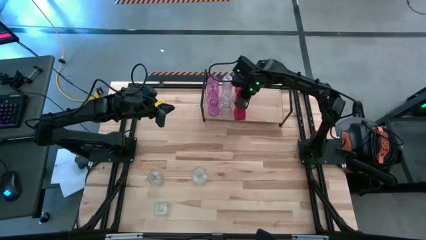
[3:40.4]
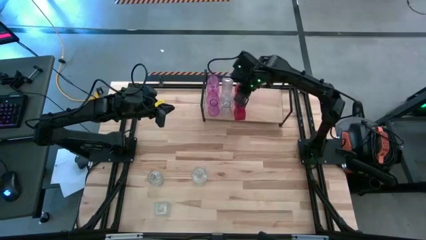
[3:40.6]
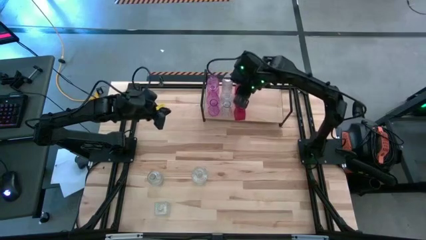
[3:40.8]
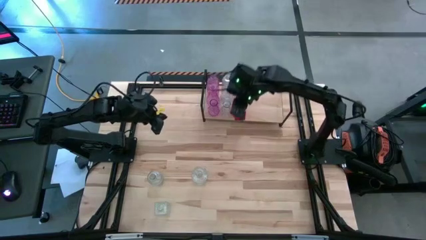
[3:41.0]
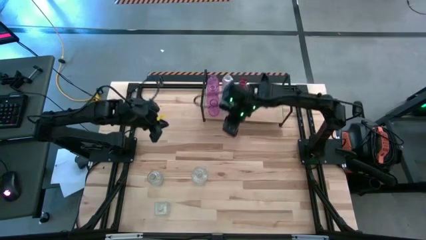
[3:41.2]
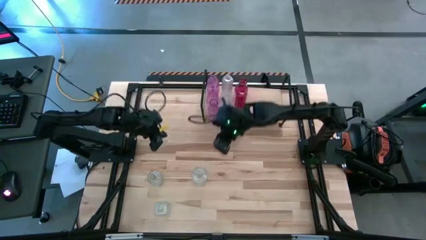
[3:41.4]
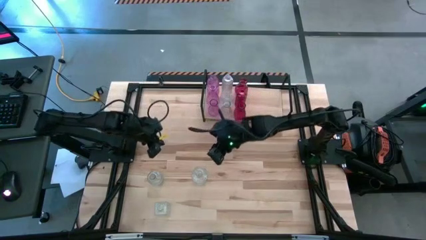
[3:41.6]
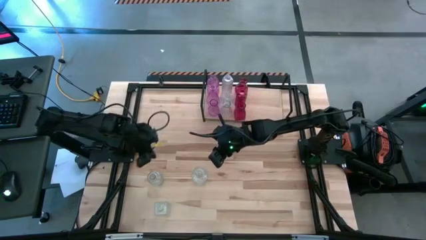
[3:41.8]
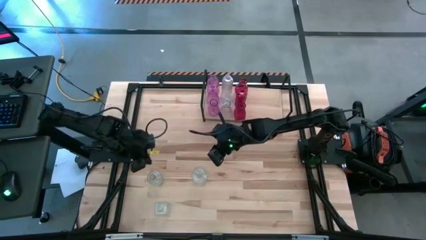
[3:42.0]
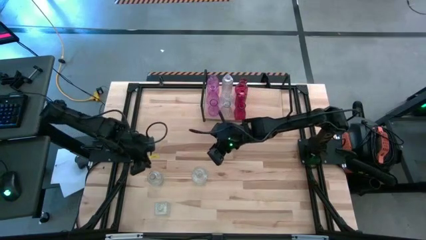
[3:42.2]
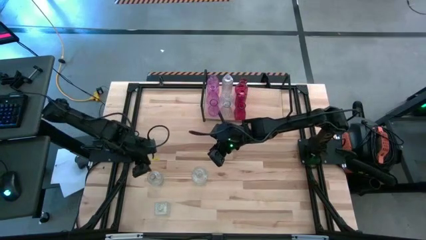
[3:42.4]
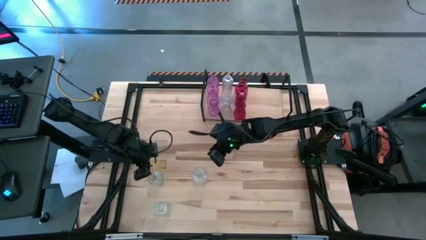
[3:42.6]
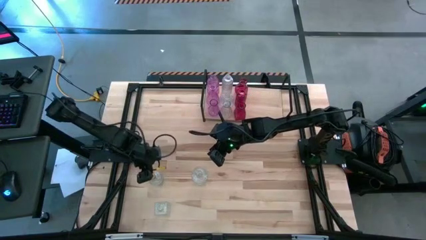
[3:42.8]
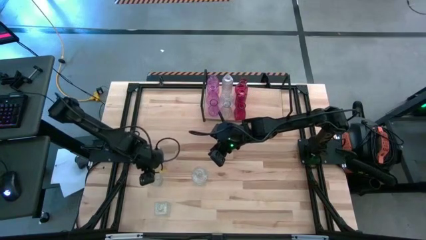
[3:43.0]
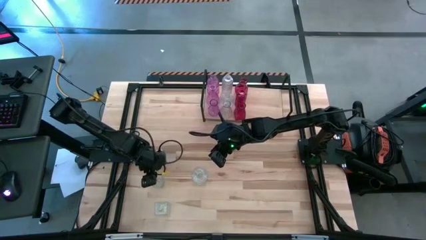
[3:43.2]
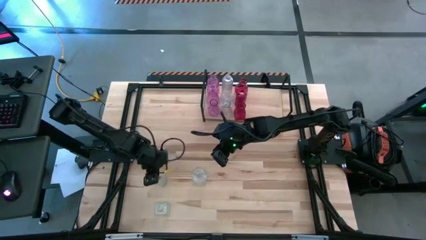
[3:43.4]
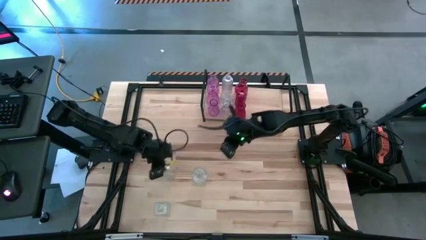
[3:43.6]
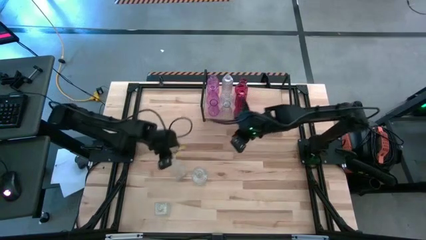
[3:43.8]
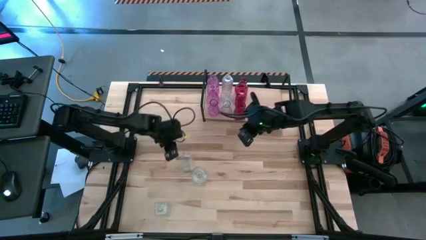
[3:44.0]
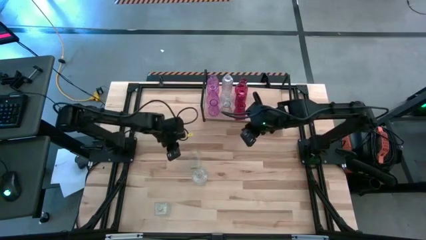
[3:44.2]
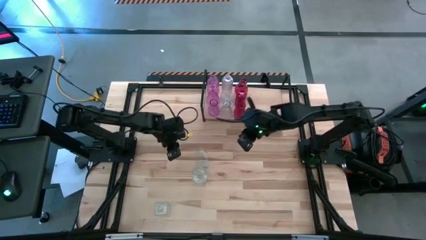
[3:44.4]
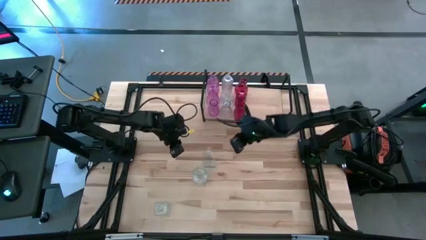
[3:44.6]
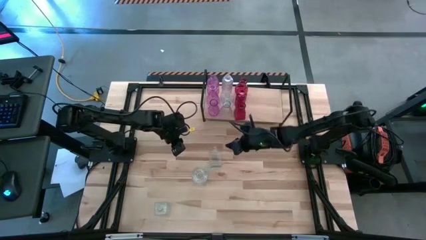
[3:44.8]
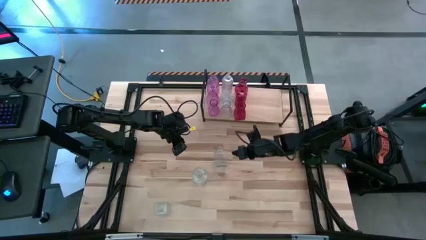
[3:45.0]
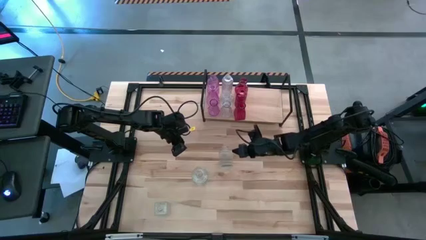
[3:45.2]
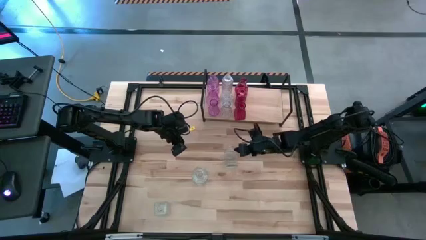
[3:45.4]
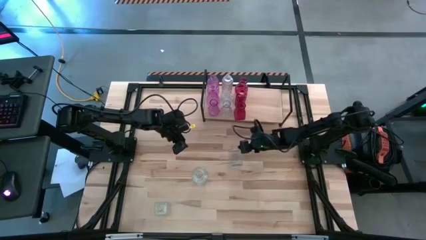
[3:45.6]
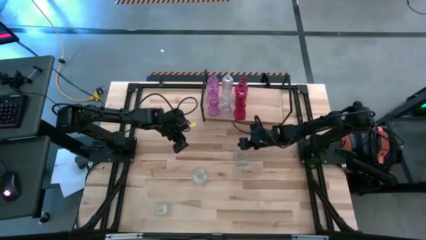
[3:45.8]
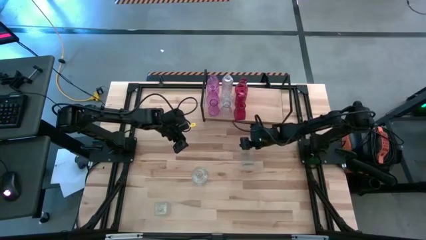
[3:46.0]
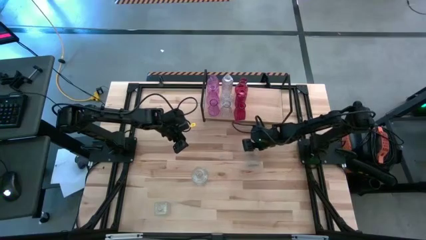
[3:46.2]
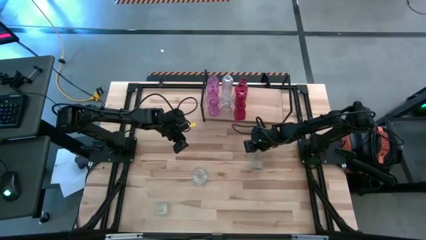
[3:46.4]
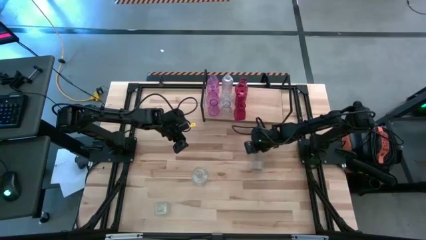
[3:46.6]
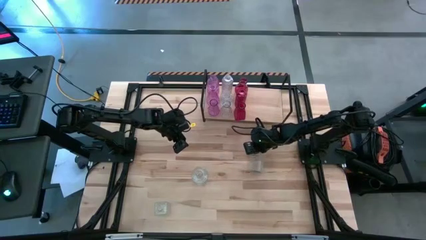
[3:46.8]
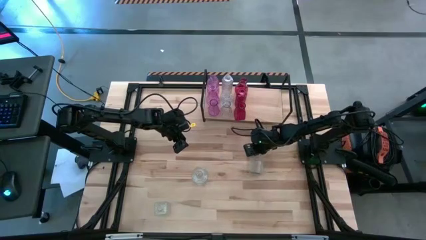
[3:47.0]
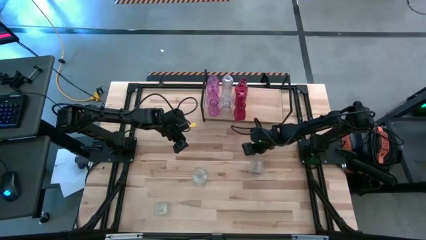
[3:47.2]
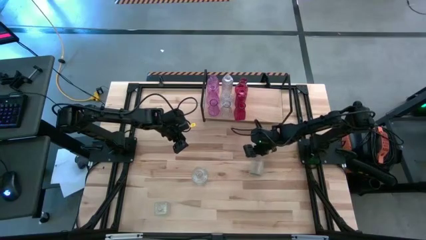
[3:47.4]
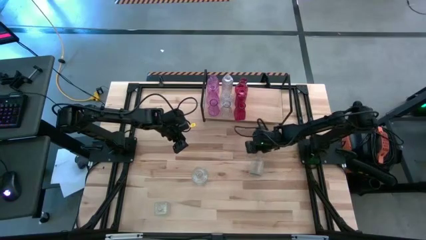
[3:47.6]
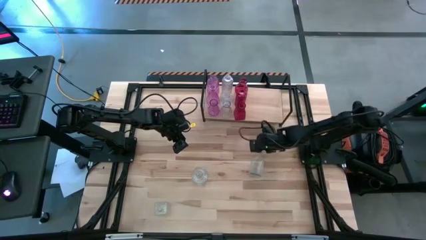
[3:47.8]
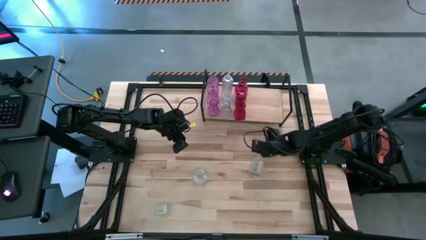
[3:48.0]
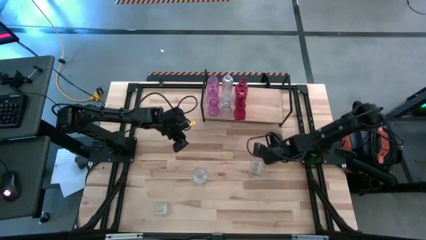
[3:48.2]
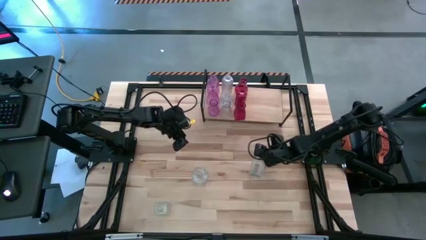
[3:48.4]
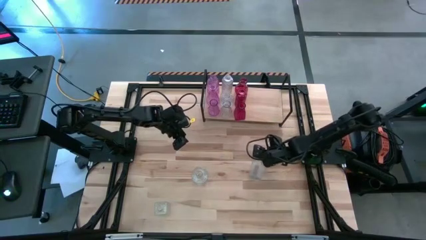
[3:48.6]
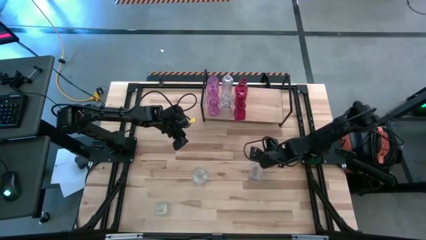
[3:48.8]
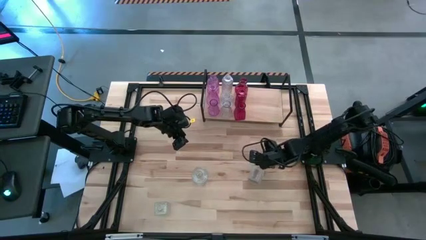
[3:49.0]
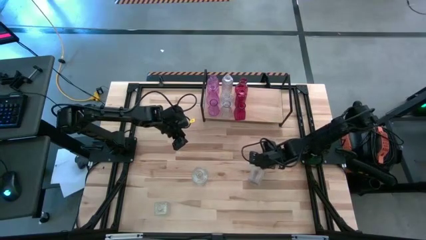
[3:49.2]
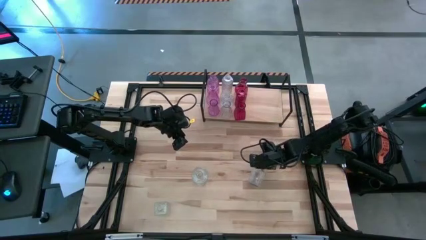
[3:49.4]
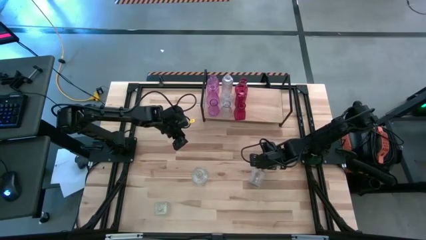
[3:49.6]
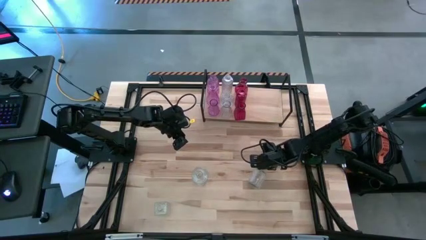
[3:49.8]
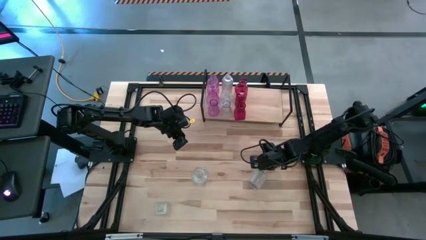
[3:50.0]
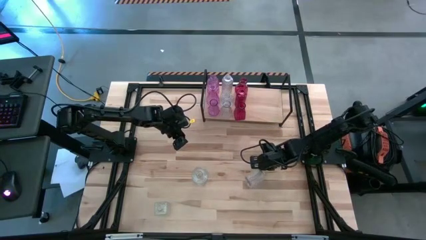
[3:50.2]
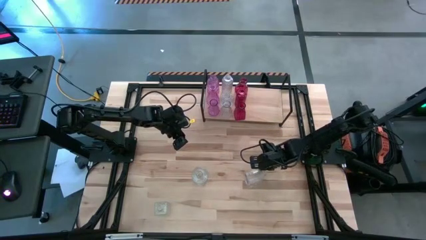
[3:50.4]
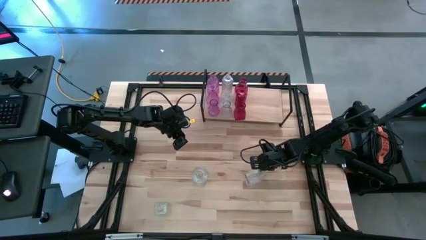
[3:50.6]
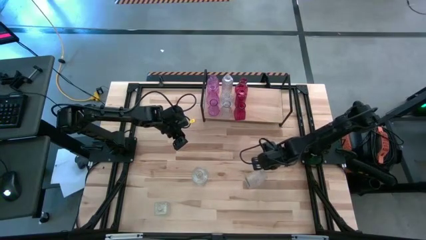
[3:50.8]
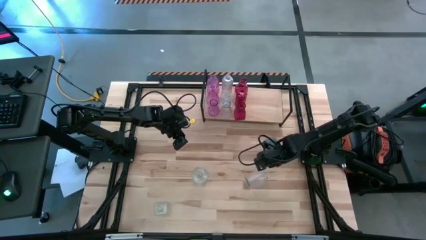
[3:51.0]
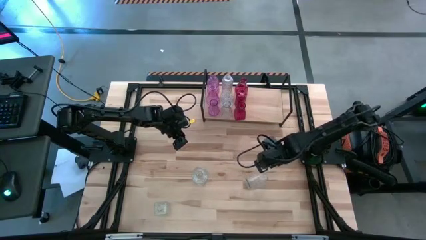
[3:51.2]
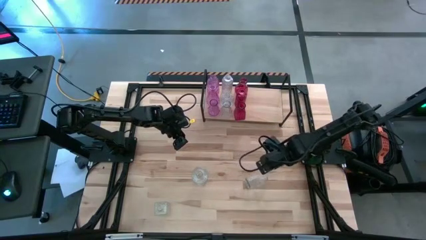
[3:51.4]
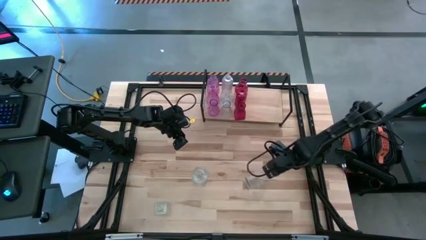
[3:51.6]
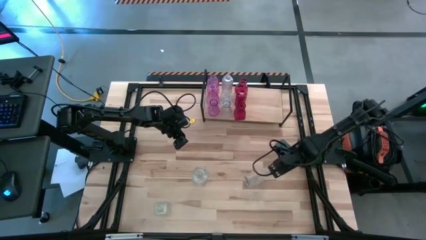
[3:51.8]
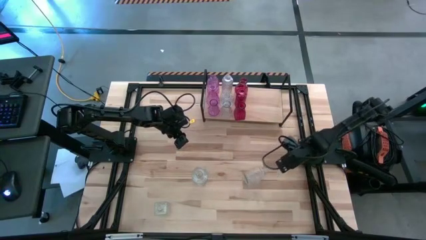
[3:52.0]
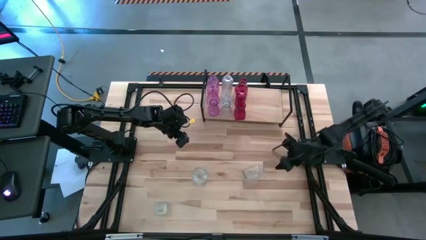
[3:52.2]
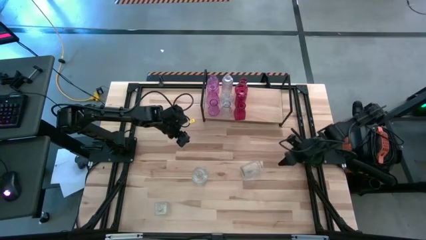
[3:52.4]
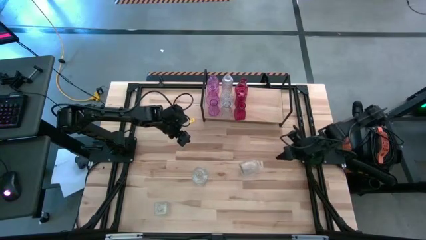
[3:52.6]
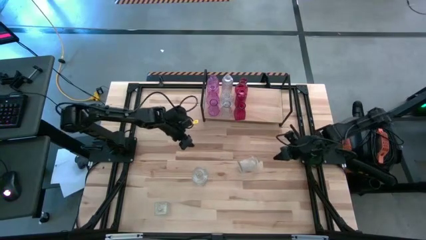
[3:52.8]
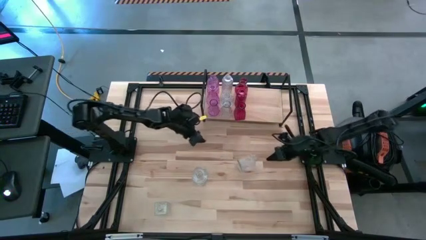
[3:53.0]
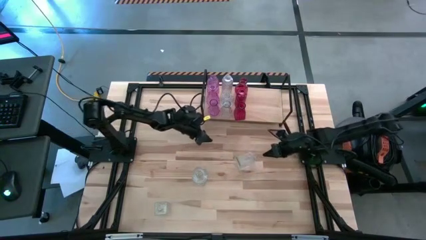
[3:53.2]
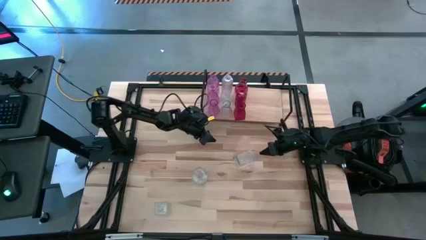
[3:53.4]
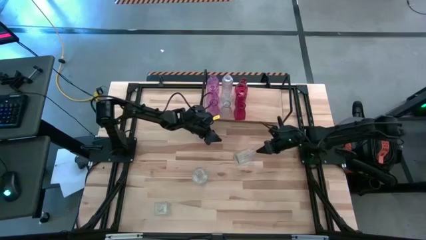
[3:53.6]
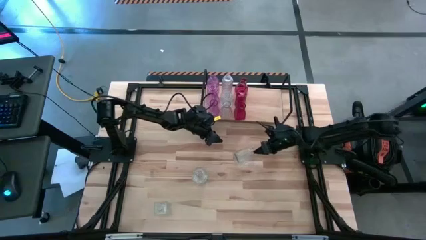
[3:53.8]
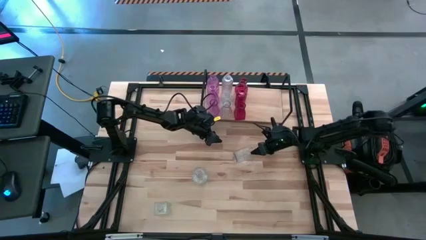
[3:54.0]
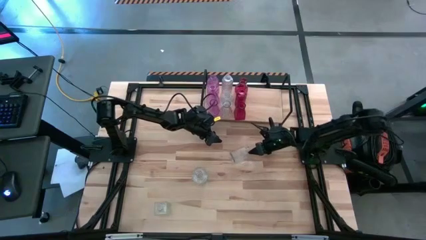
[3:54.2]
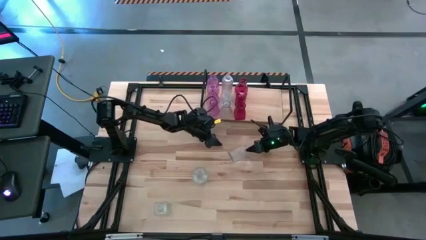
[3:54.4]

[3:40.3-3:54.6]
Task: sort vases onto shelf
Put the transparent vase on the shelf
